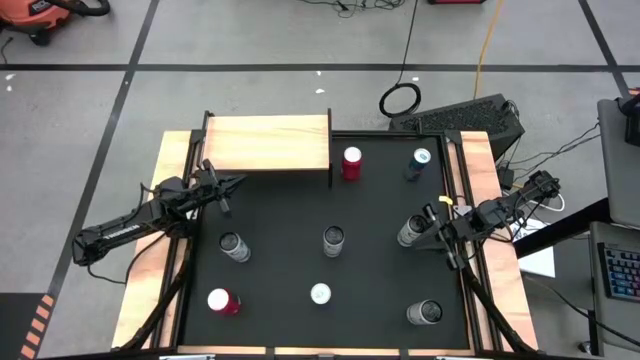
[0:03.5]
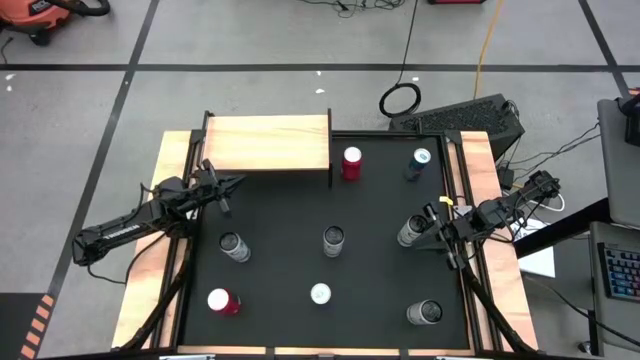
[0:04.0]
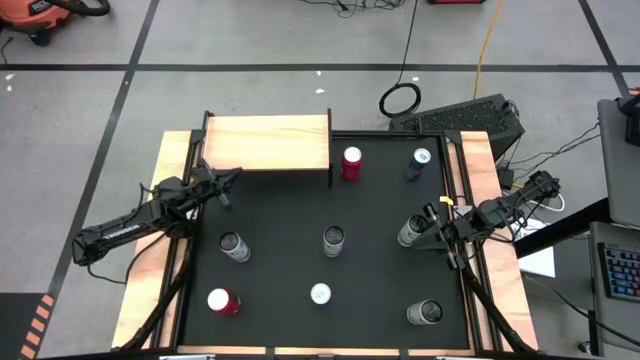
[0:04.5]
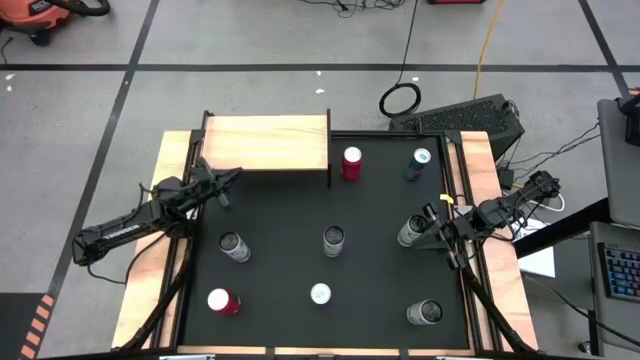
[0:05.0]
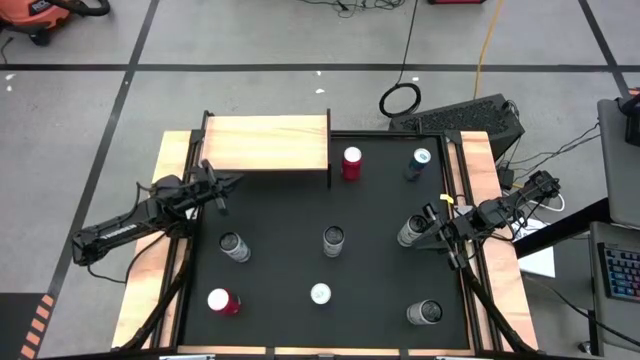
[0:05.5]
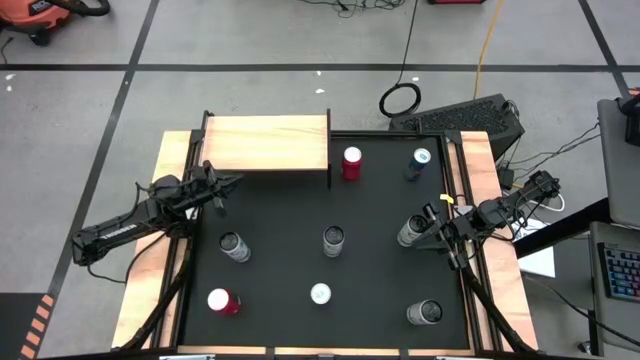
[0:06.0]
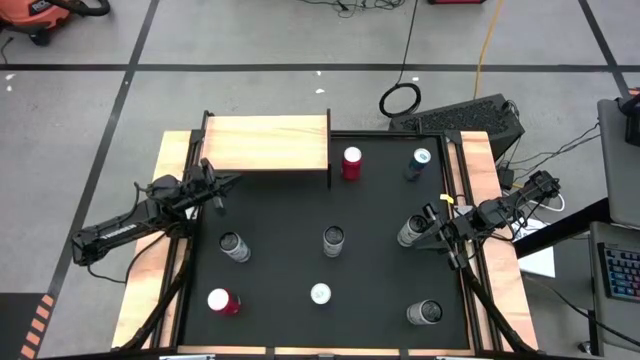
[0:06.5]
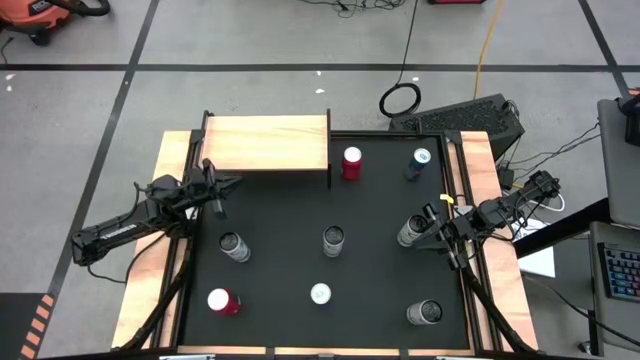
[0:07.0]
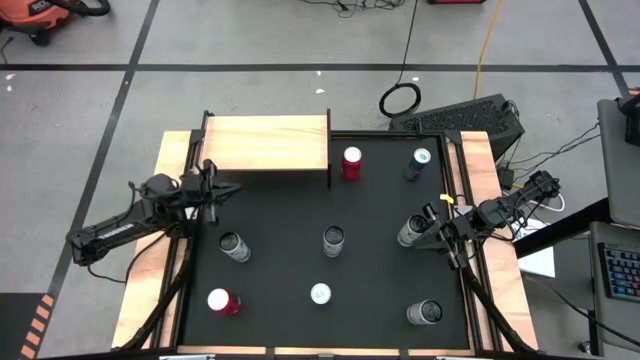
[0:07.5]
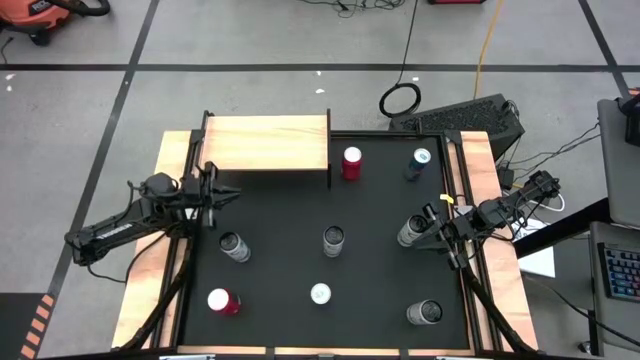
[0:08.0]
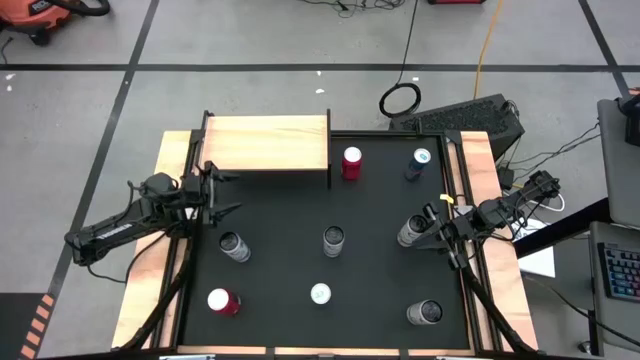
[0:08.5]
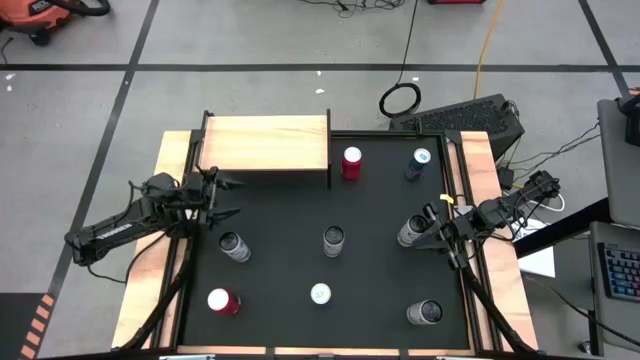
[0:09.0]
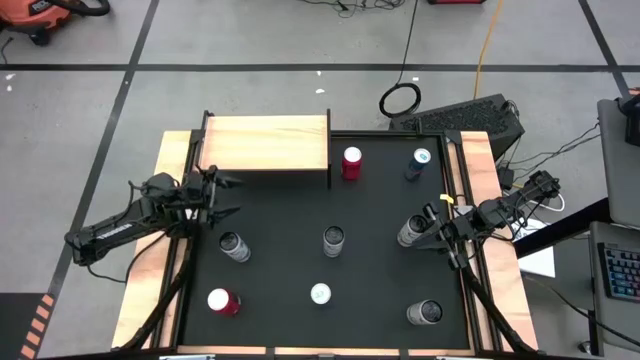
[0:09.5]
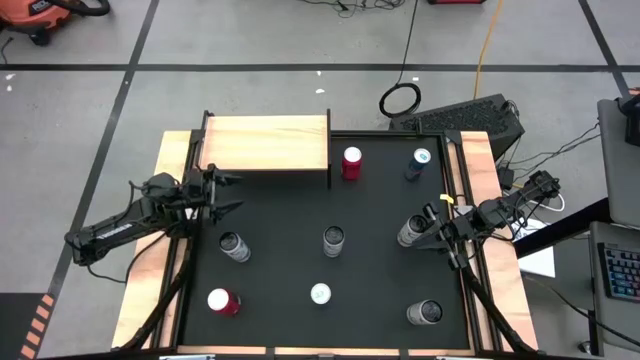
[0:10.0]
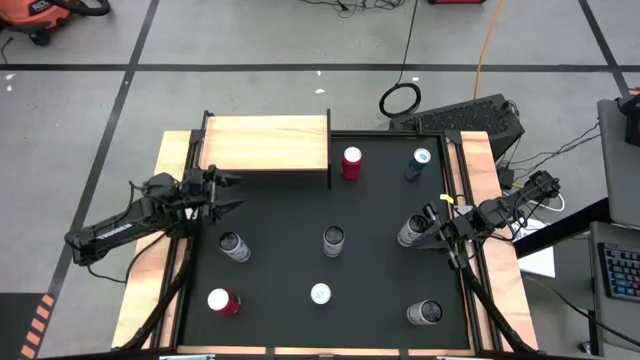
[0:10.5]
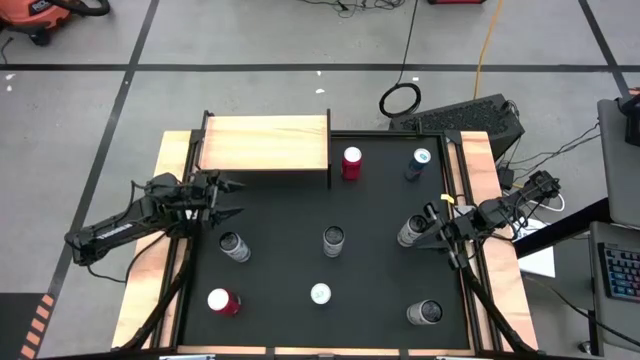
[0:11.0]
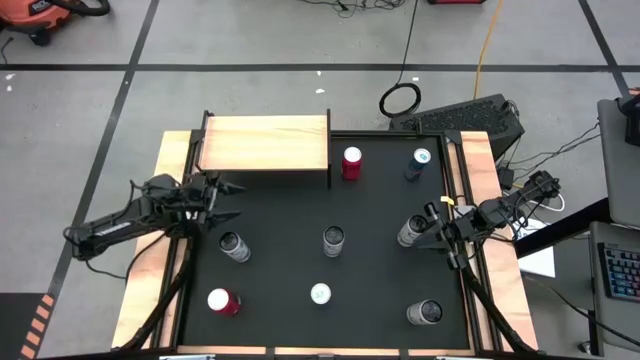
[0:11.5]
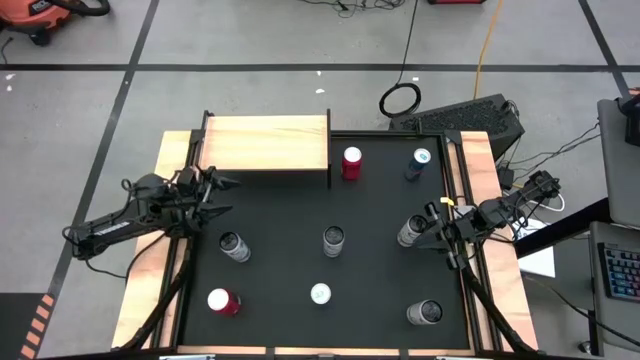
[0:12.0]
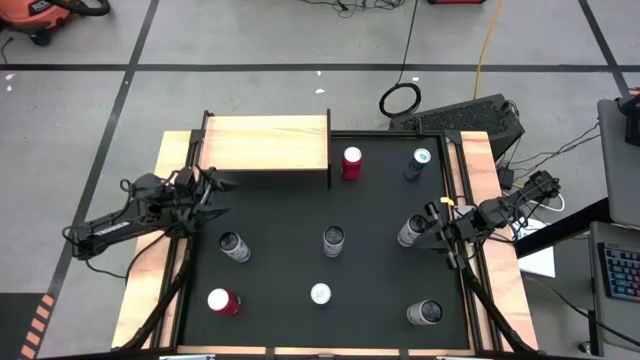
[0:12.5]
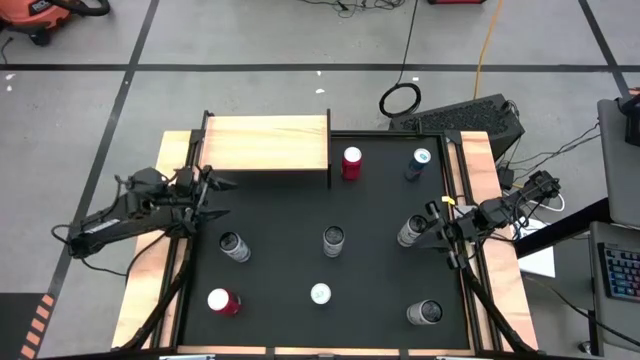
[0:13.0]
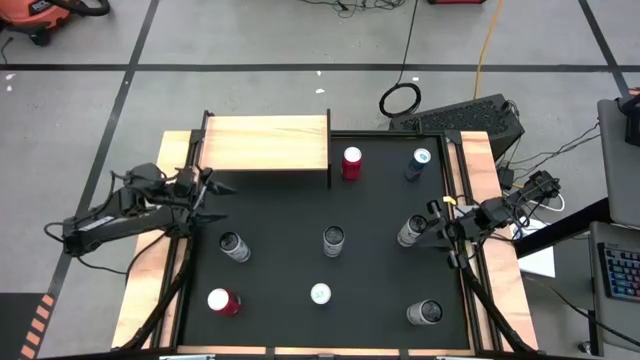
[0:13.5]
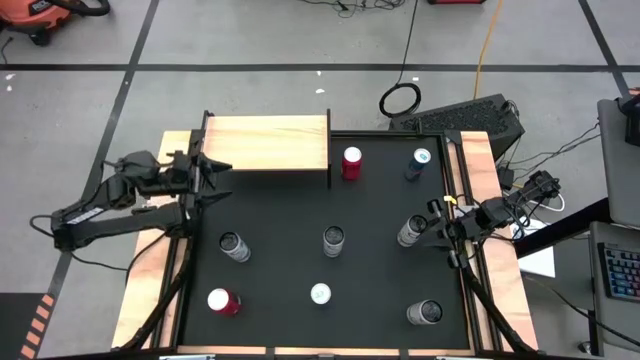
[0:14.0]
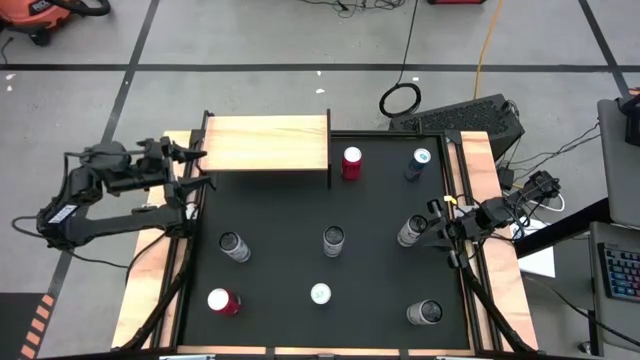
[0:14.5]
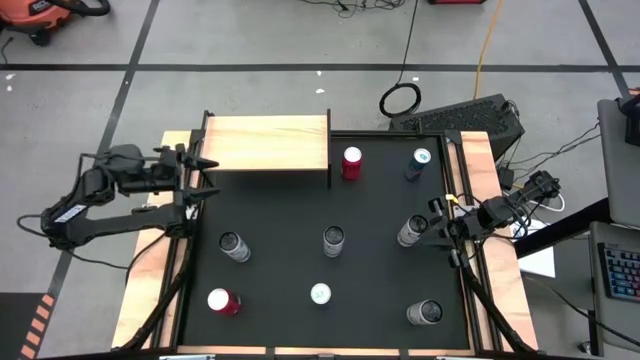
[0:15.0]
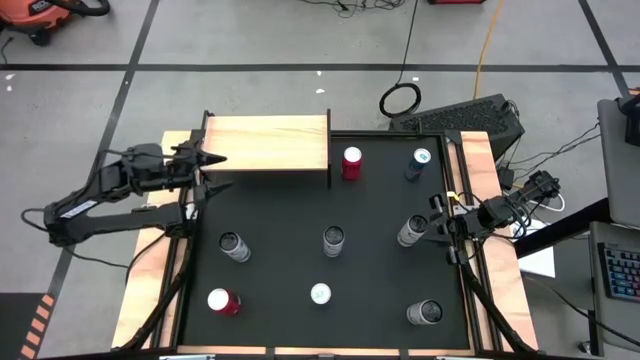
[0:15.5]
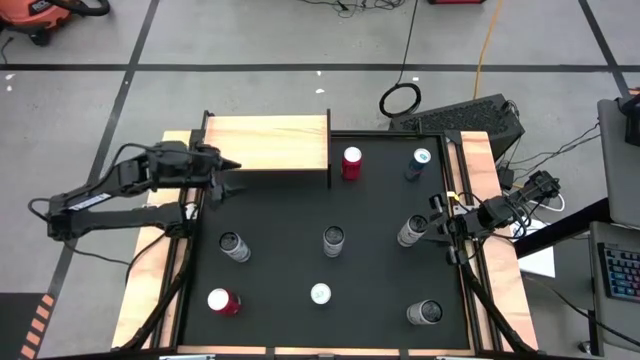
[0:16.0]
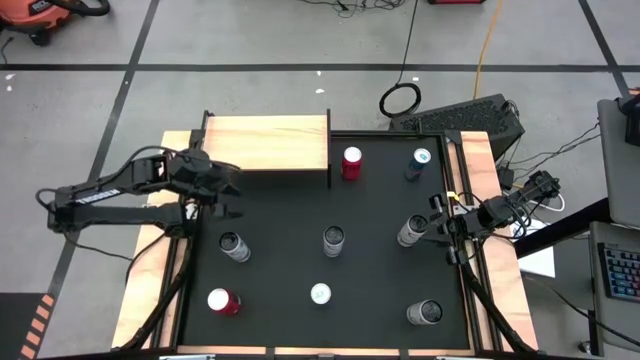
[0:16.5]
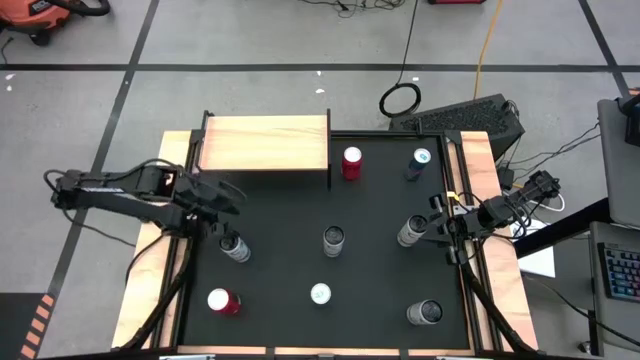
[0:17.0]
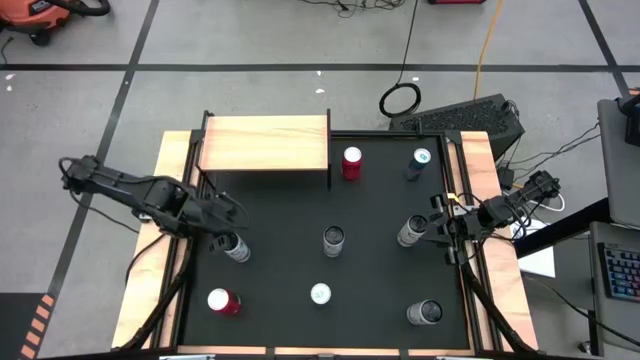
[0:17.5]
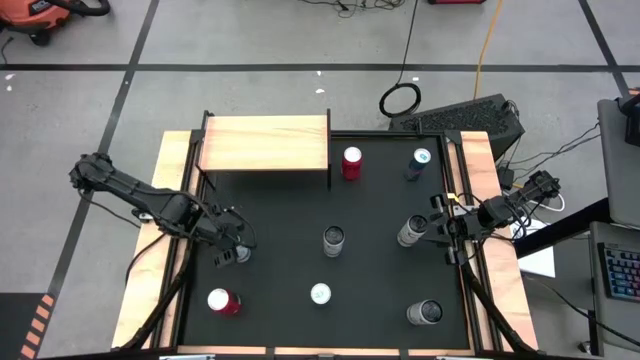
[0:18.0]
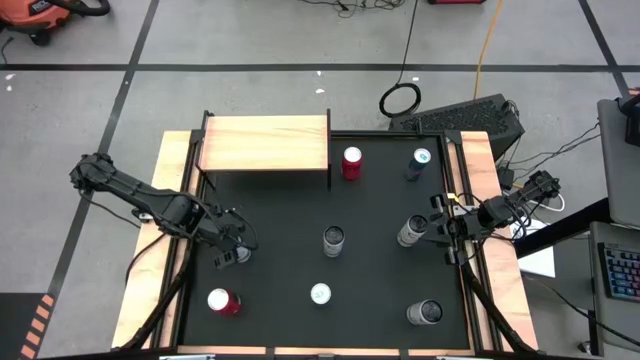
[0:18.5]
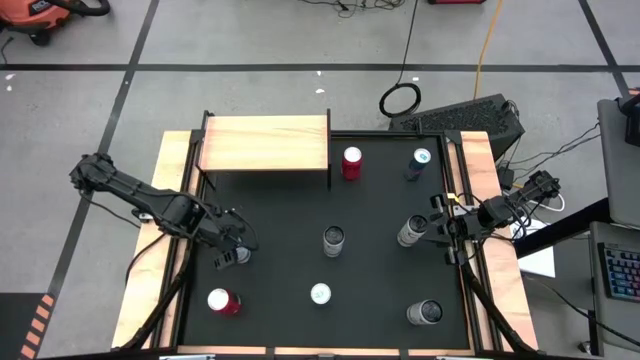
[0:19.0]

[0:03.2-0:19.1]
Task: Place canned beverage on shelf
Put the left white pink soda can on the shelf

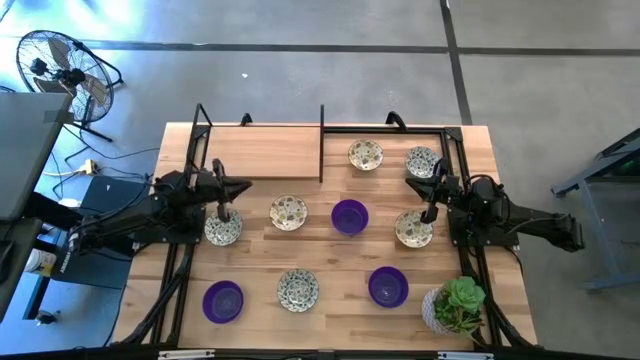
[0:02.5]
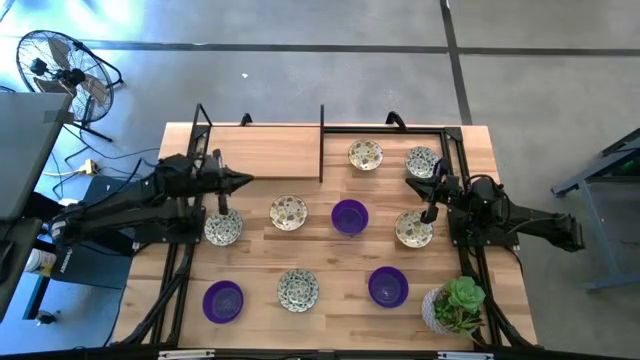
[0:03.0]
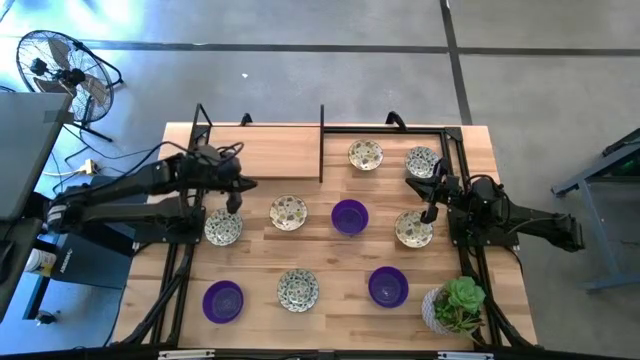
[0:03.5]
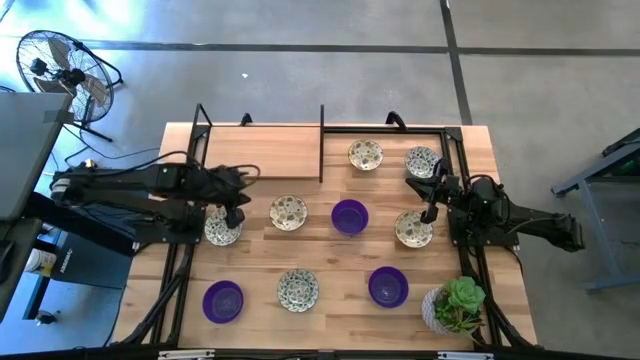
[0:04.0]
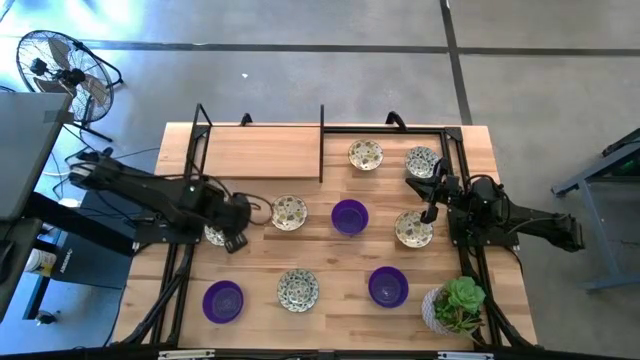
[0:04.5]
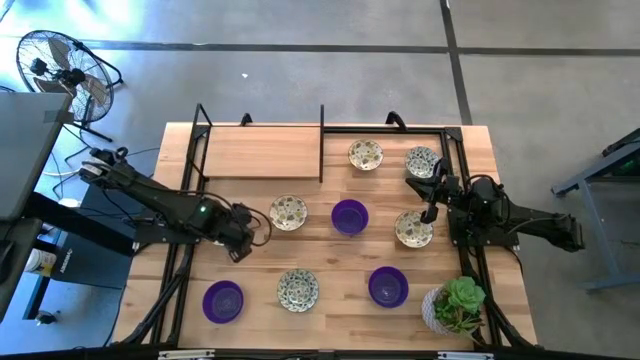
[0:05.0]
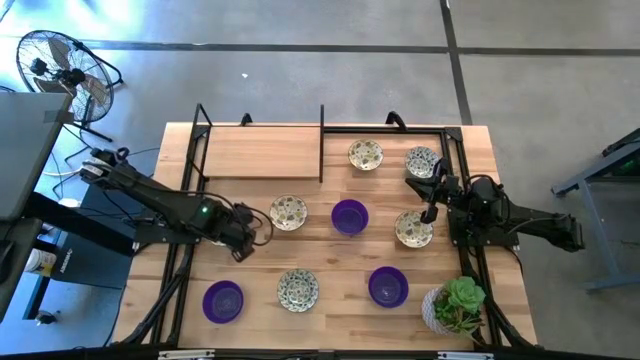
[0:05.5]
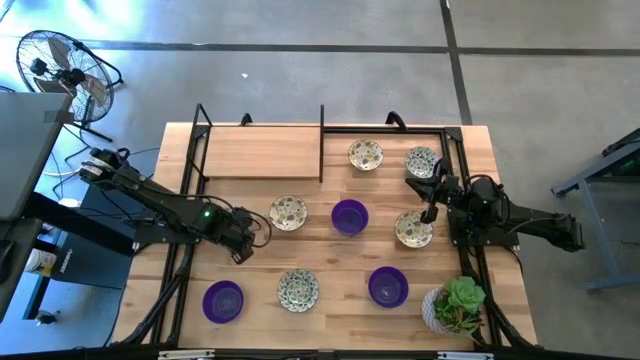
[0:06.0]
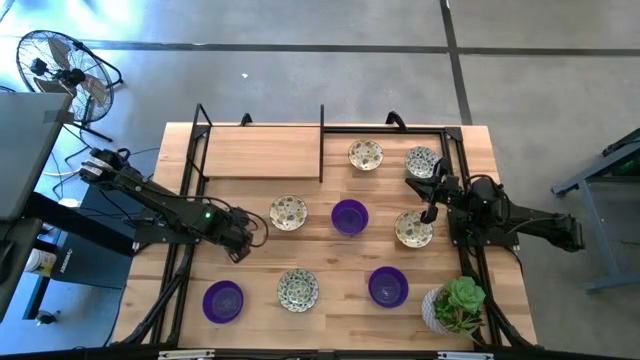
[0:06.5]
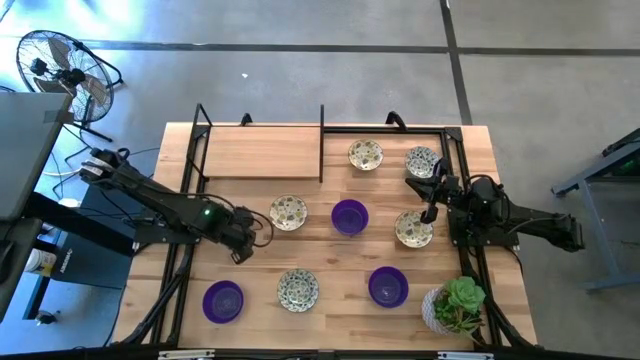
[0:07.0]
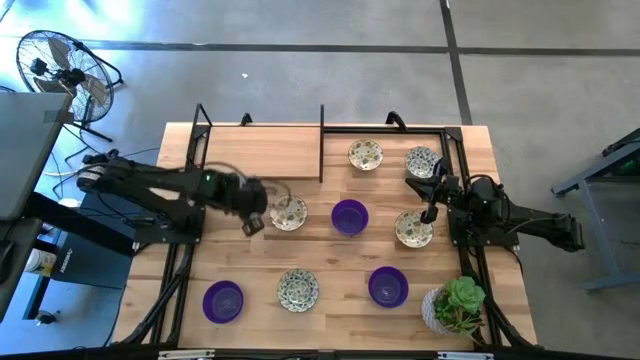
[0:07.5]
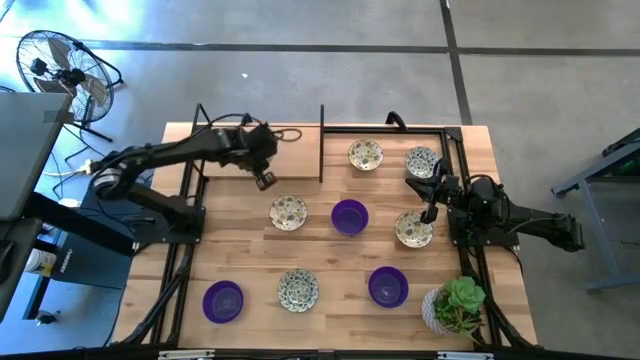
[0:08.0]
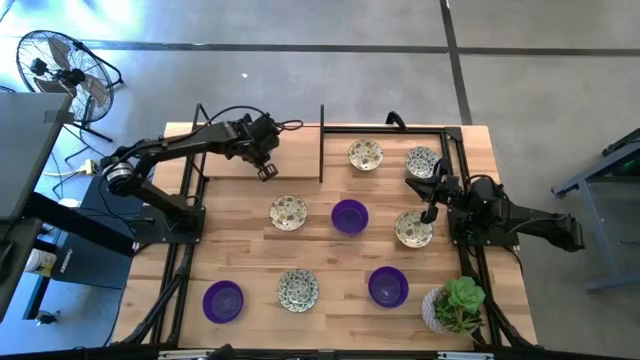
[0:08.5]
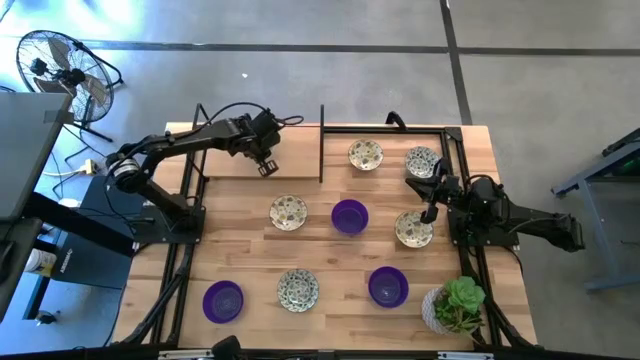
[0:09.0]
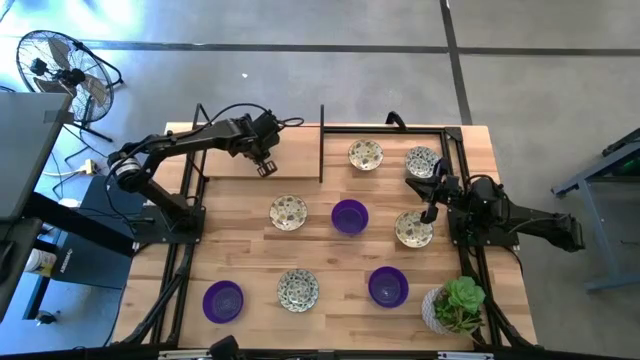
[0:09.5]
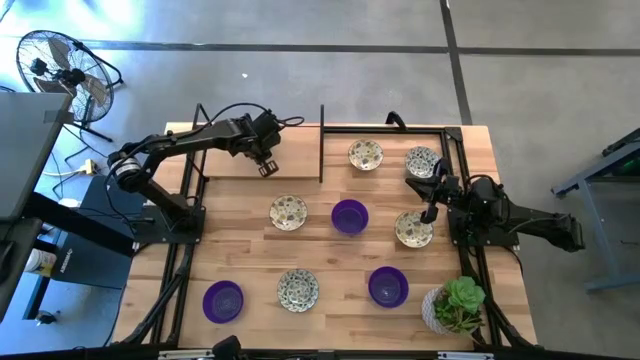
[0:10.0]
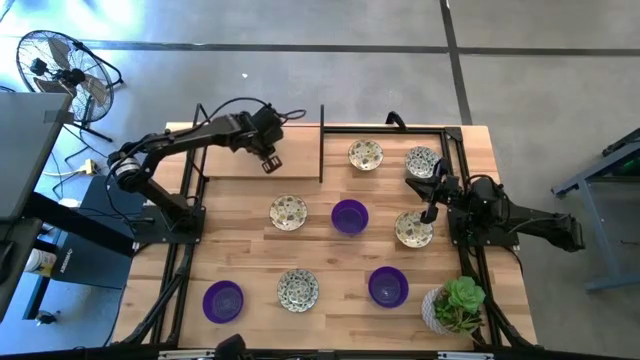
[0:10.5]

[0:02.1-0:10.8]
Task: Pick & Place Mini bowls
Put the middle left light blue bowl on the shelf
